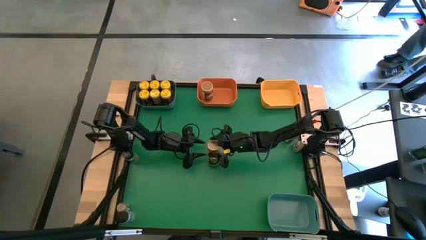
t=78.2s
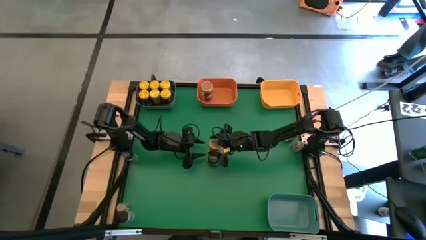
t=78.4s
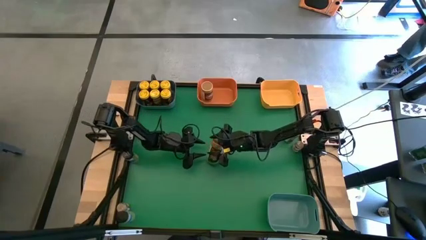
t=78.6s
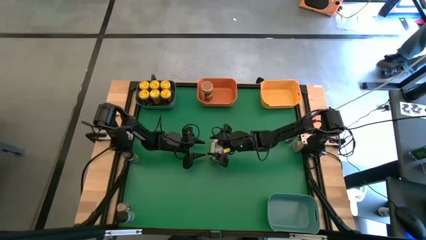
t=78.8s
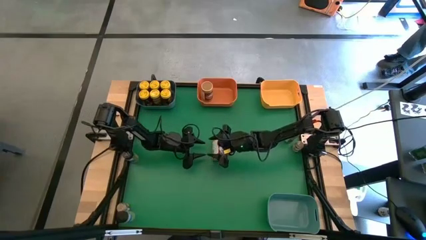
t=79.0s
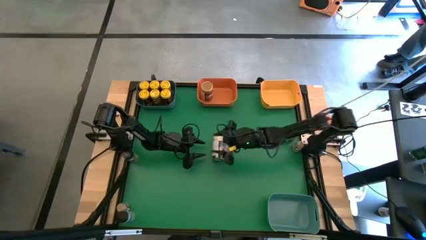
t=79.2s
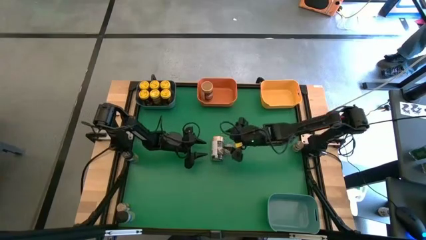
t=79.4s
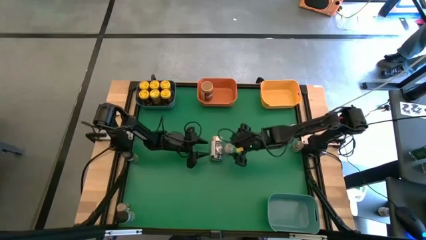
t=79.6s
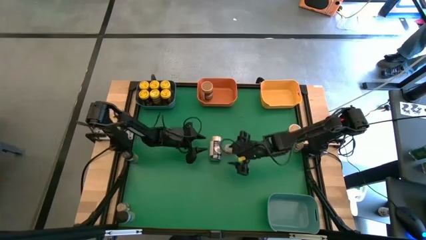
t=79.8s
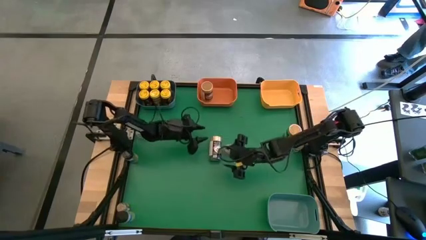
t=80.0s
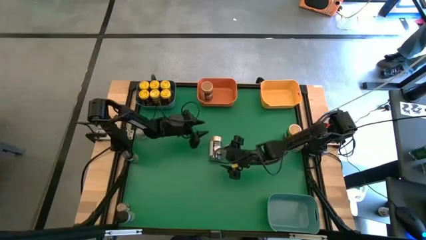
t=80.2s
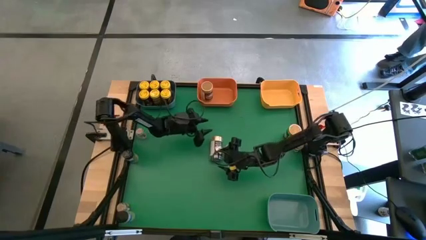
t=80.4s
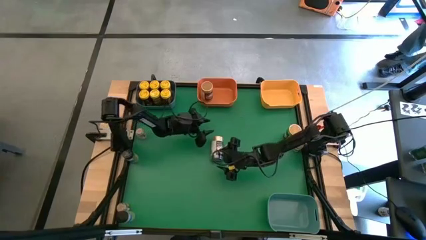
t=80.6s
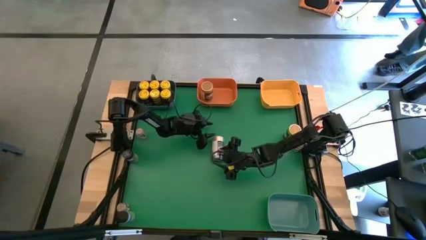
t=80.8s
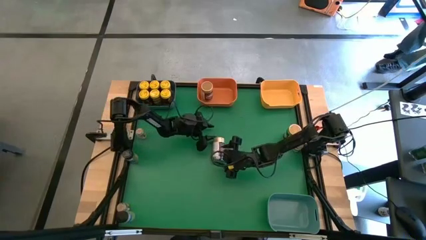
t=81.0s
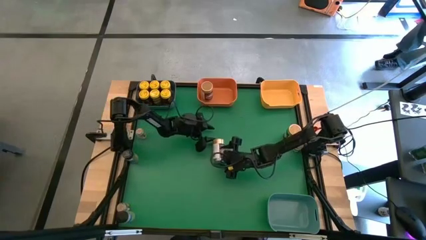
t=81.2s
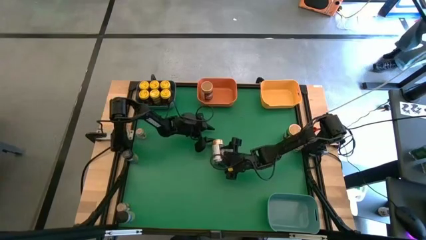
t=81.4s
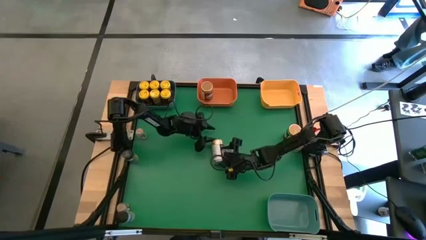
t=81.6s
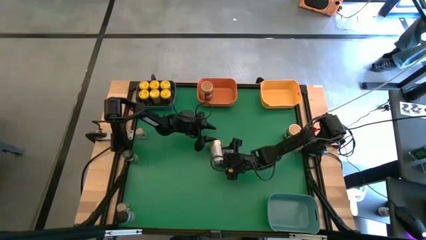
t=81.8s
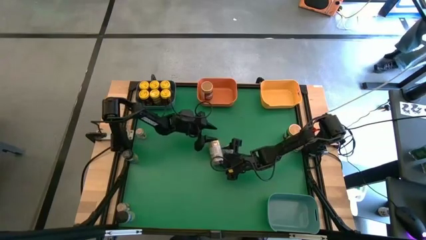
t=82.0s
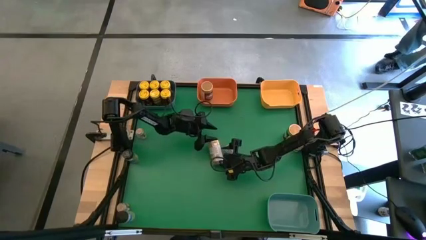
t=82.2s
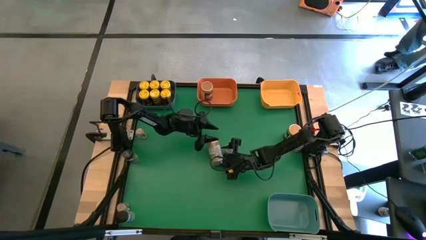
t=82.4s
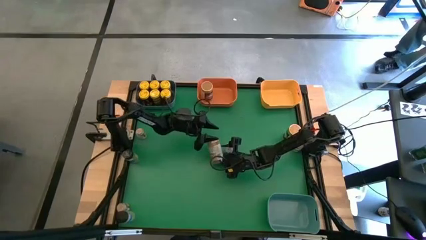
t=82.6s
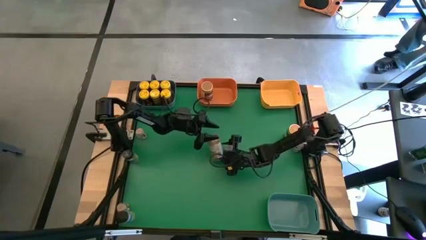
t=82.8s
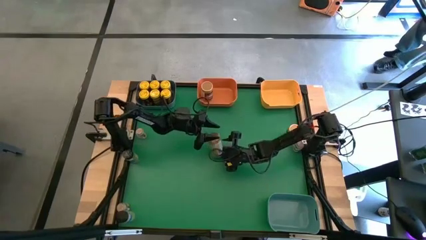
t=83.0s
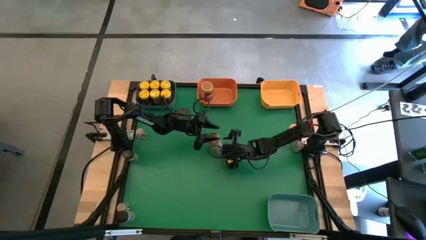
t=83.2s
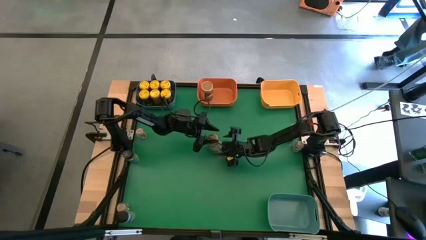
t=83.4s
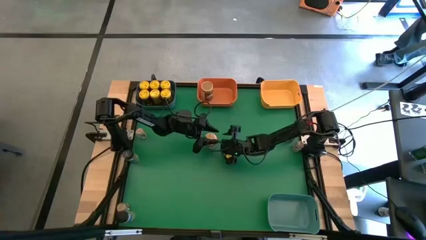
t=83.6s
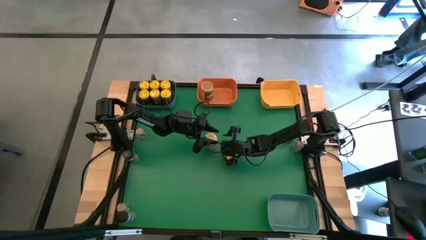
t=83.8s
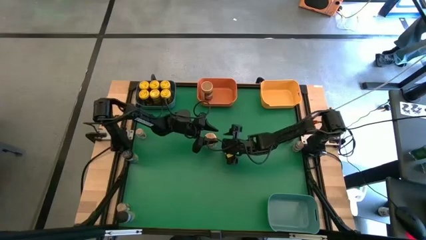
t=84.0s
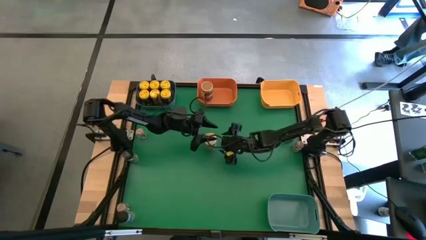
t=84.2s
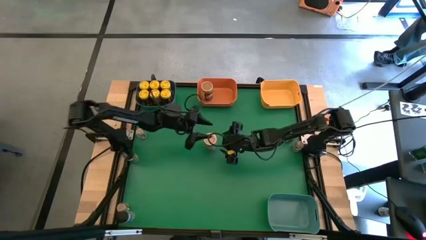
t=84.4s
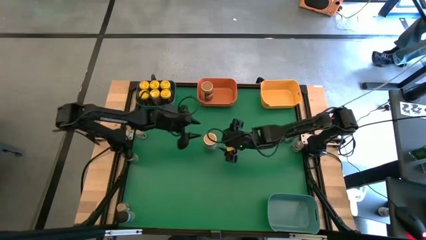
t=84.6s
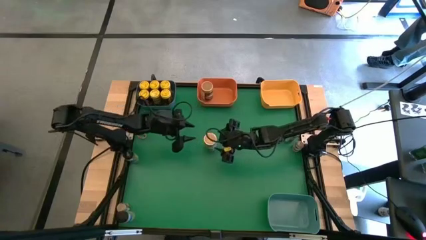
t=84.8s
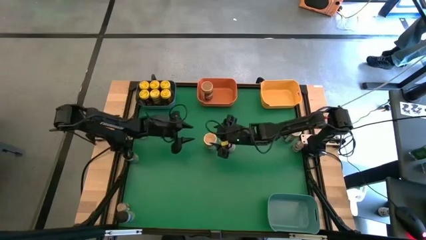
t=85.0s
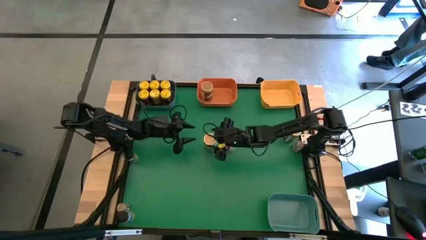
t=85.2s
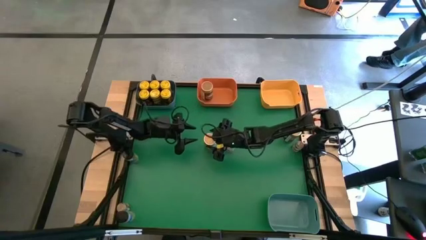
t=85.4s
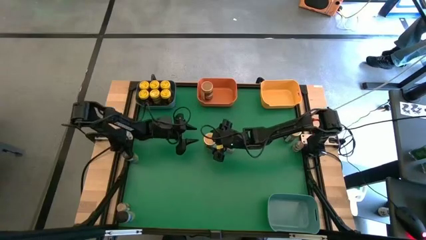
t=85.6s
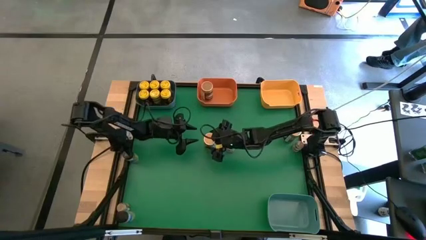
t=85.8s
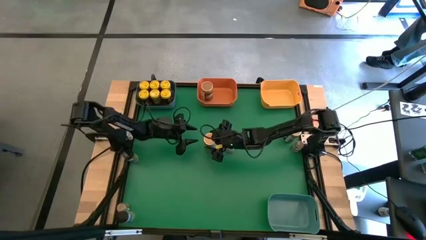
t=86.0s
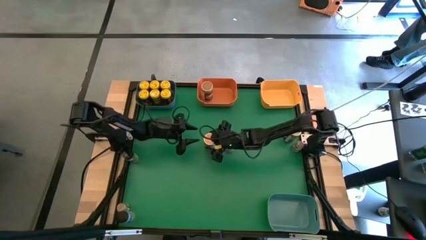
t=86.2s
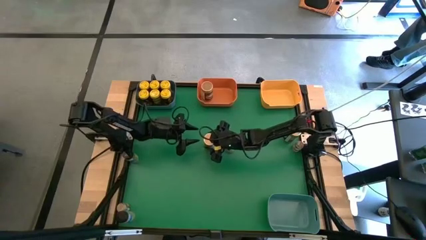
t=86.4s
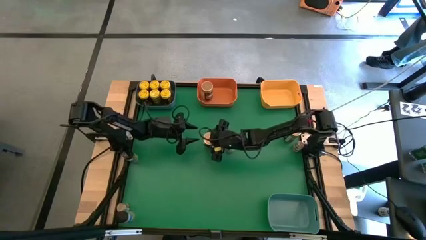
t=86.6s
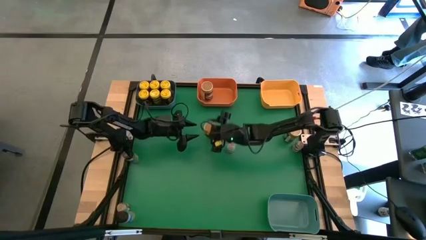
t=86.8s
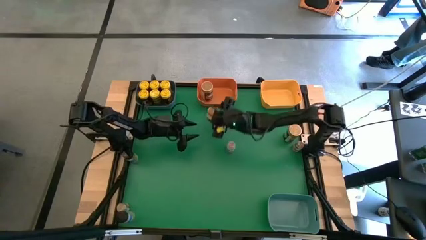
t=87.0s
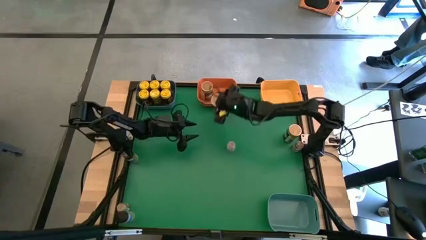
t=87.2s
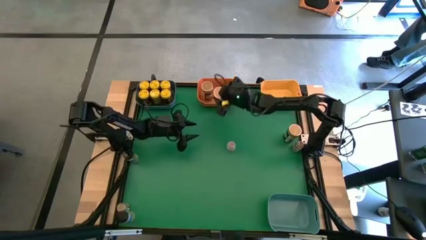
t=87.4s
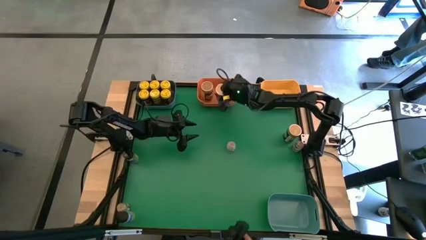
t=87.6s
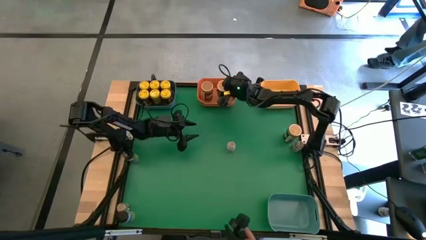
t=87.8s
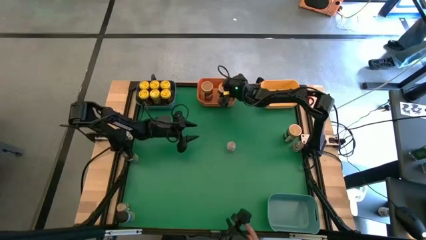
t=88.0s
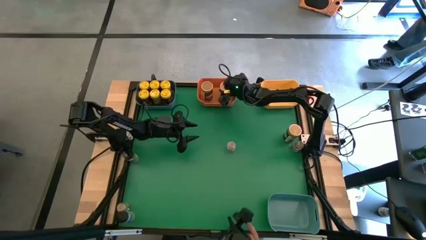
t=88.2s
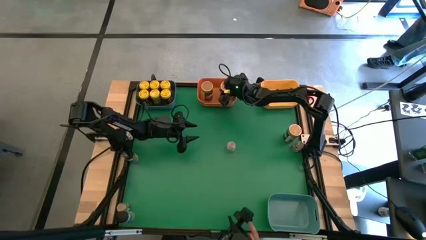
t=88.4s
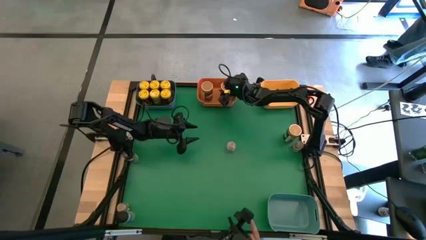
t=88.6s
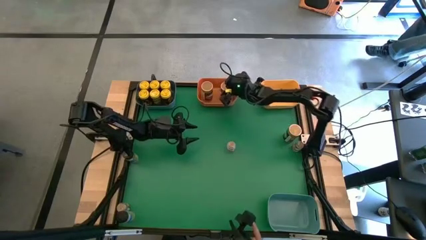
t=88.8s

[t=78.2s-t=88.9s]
Task: Sort spices by type
Put the gold seasoning bottle into the orange bin

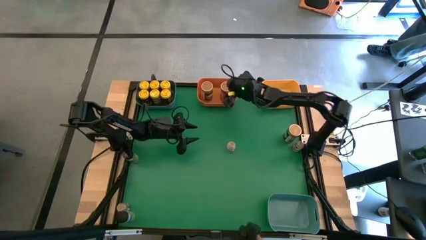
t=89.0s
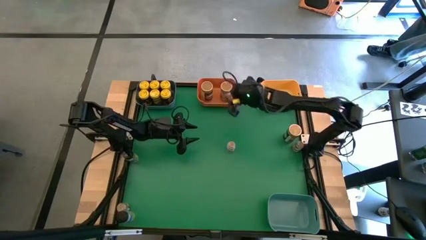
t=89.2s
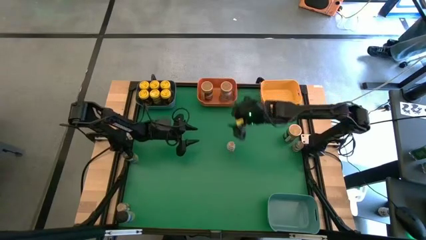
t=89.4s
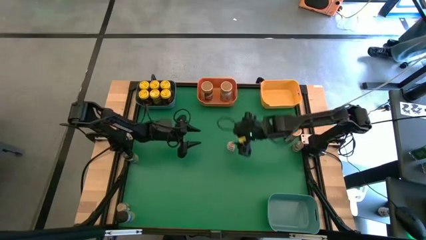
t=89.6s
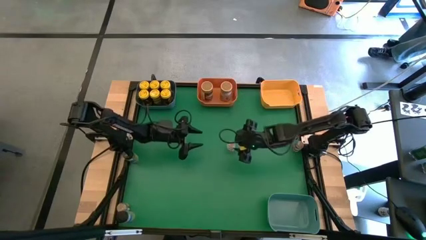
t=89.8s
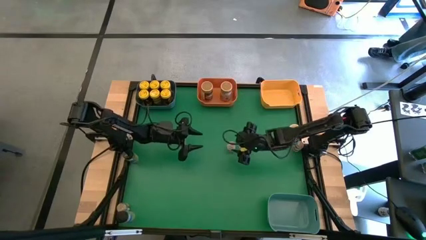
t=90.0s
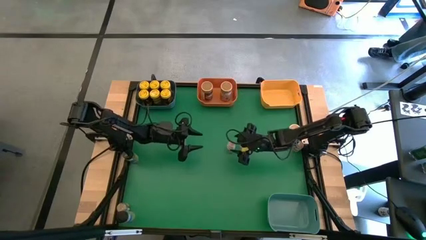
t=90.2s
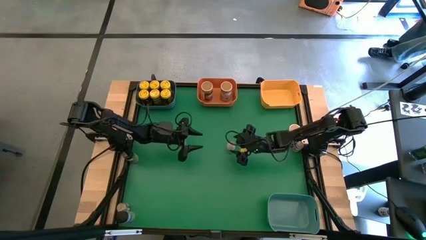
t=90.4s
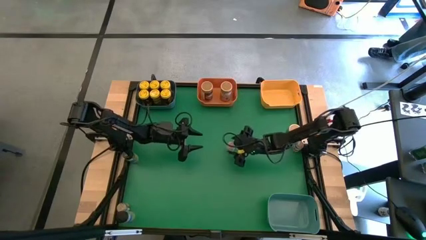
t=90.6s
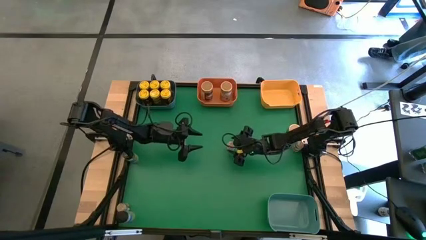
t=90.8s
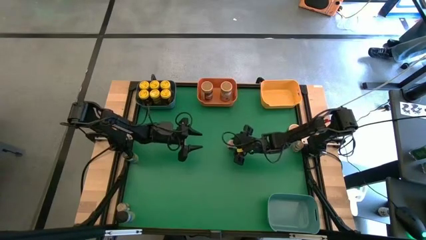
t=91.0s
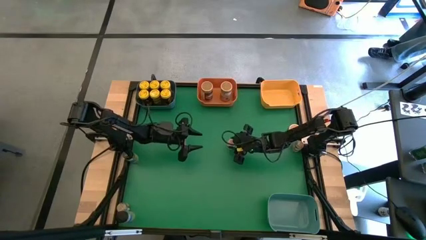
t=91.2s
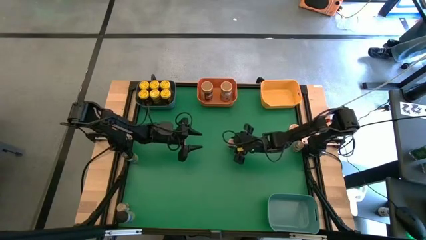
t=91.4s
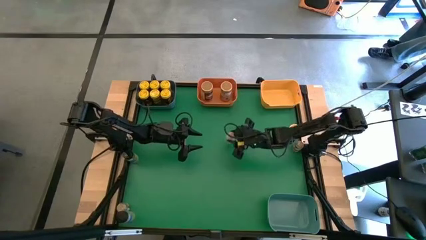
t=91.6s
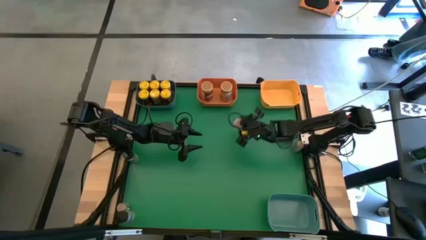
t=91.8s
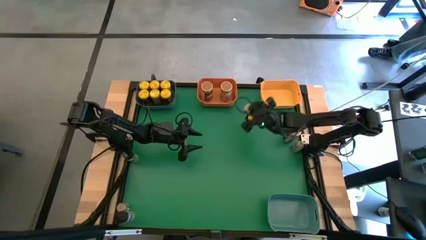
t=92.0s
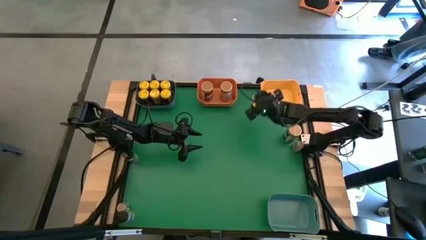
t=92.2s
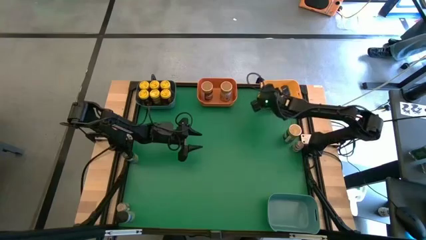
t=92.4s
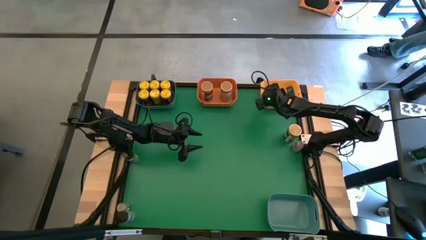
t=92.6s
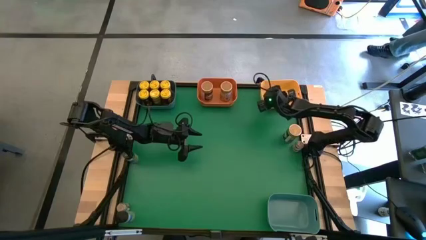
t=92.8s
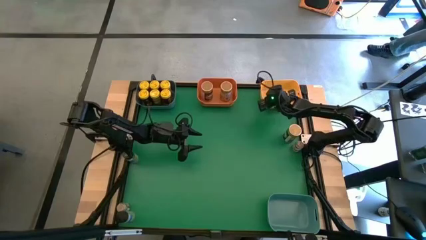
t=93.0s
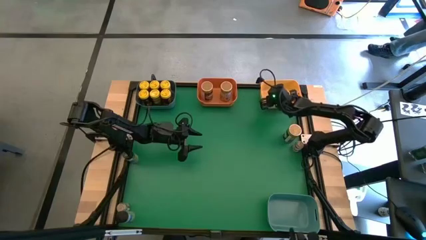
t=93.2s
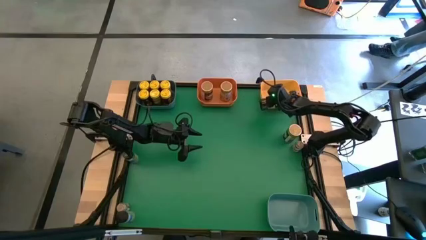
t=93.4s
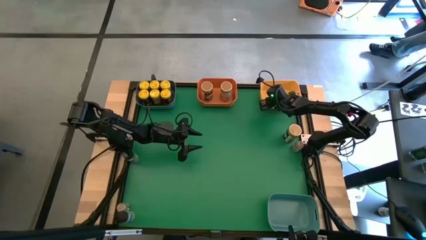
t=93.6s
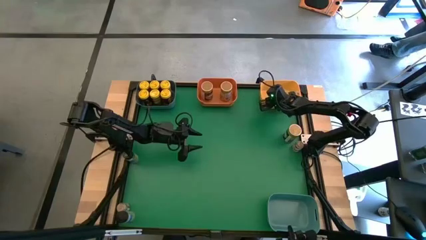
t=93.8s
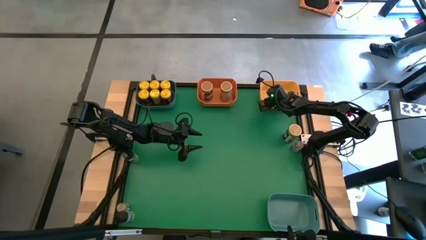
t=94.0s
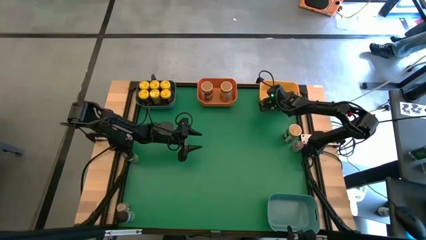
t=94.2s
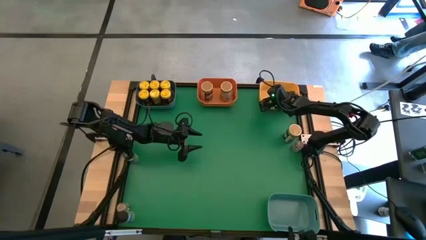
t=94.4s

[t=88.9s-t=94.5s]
Put the brown seasoning bottle into the yellow bin
